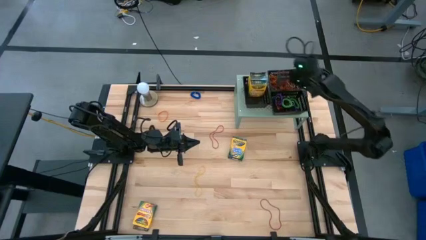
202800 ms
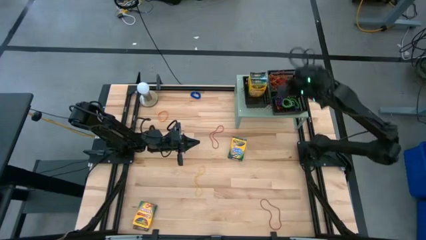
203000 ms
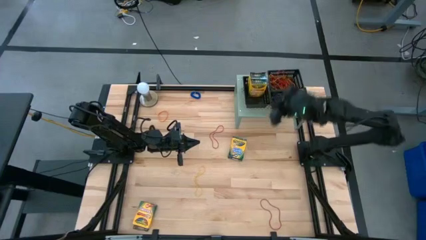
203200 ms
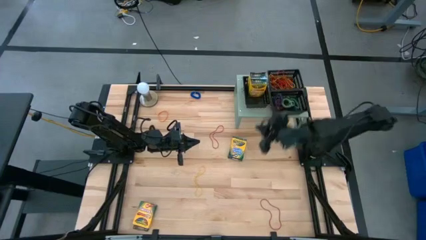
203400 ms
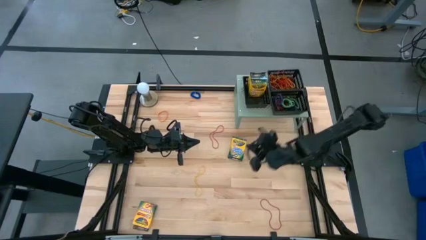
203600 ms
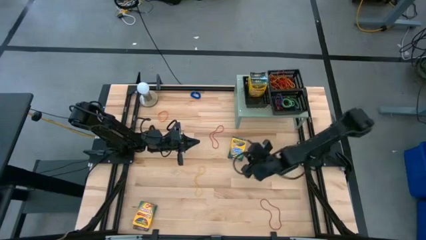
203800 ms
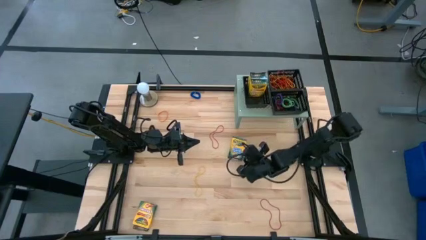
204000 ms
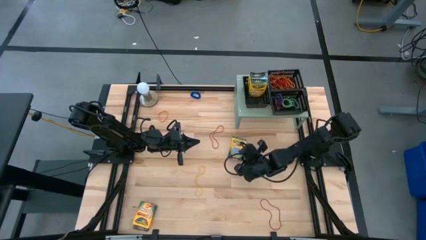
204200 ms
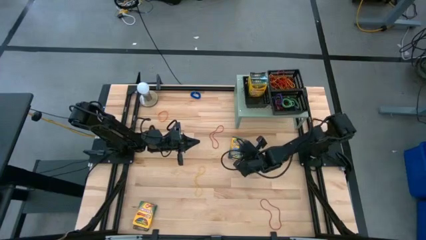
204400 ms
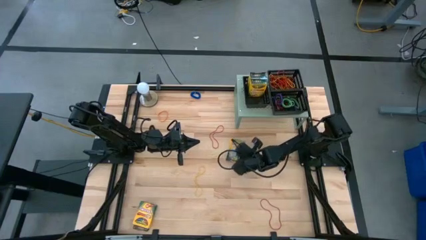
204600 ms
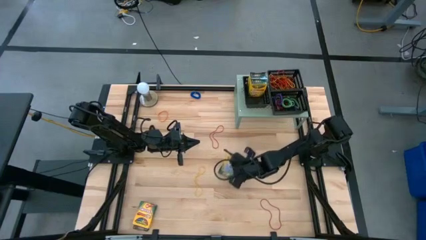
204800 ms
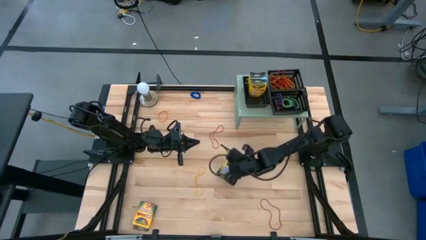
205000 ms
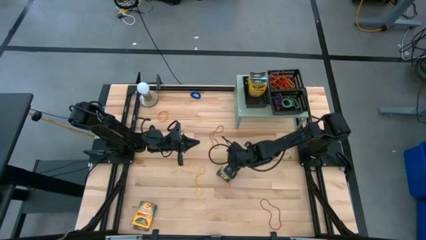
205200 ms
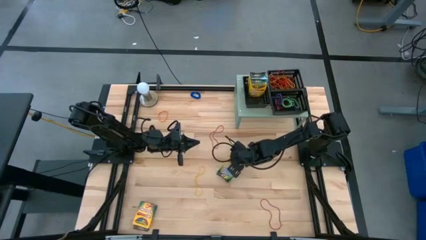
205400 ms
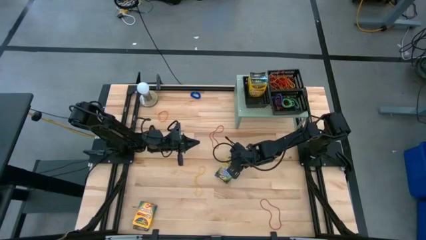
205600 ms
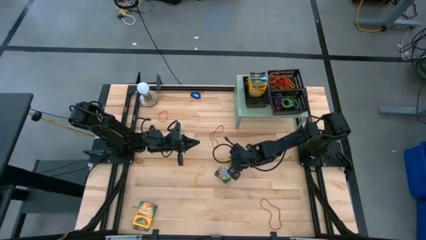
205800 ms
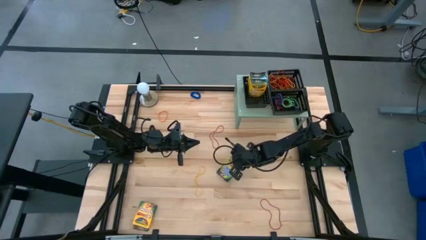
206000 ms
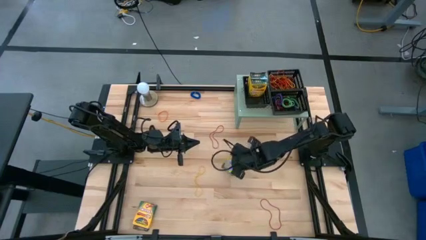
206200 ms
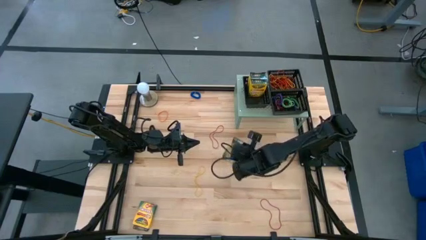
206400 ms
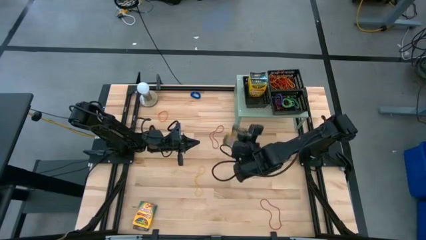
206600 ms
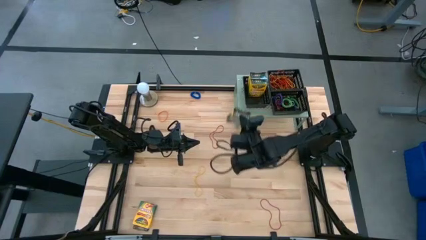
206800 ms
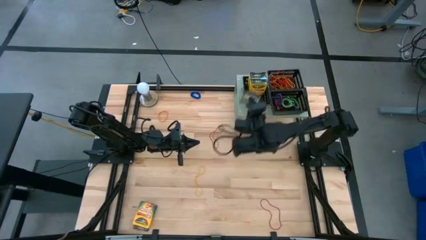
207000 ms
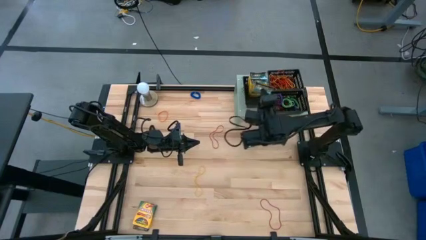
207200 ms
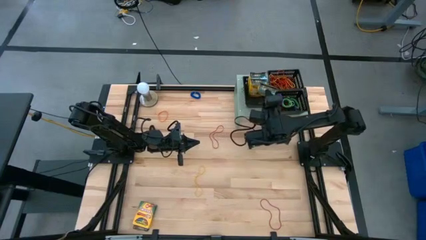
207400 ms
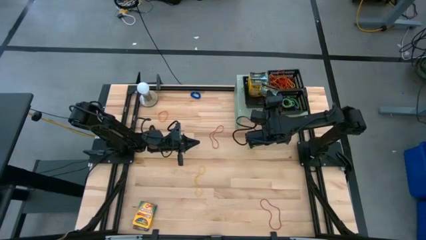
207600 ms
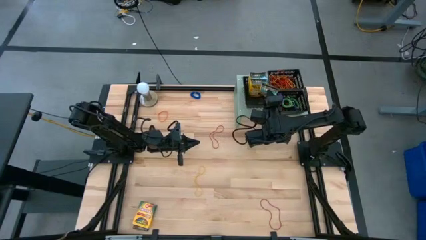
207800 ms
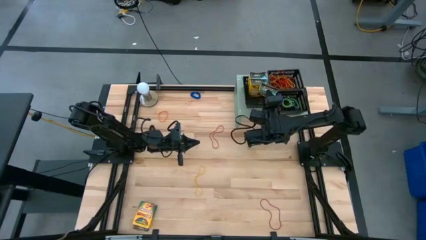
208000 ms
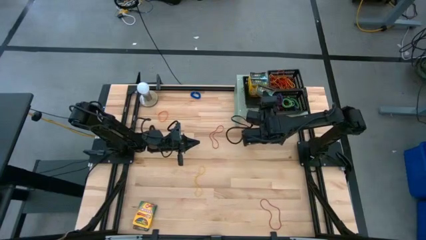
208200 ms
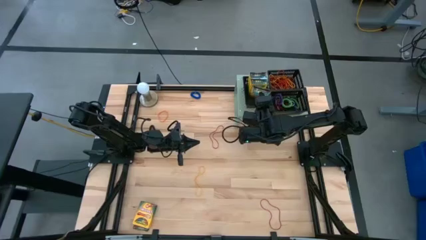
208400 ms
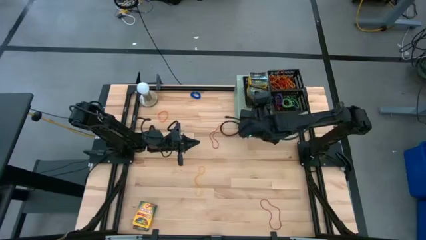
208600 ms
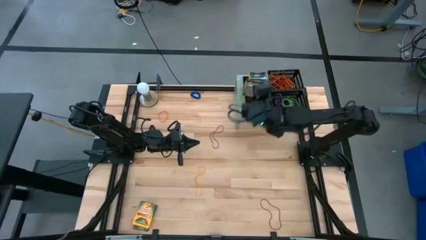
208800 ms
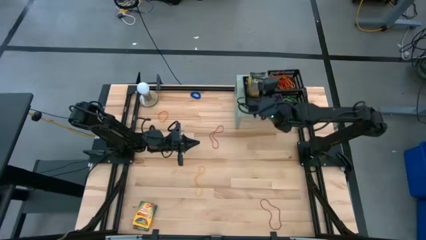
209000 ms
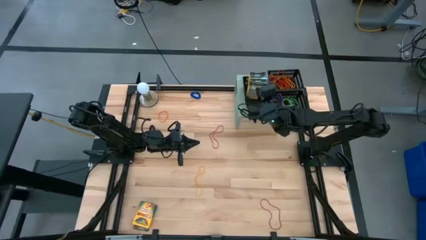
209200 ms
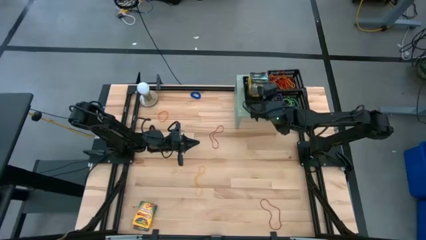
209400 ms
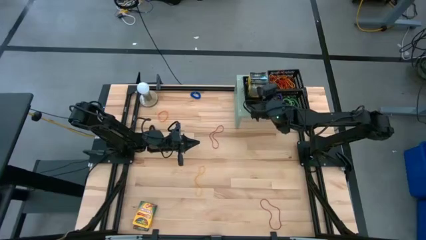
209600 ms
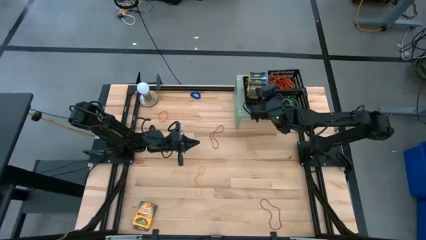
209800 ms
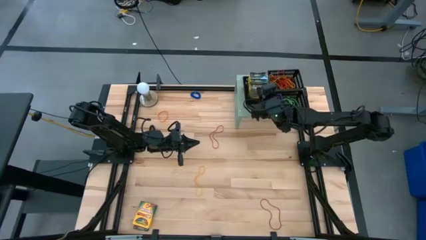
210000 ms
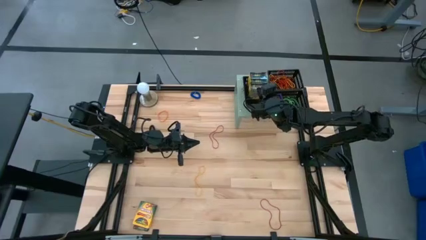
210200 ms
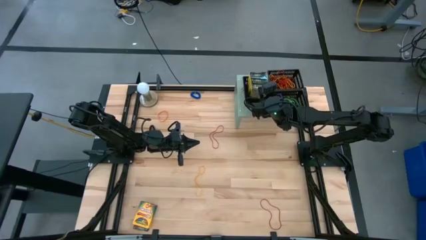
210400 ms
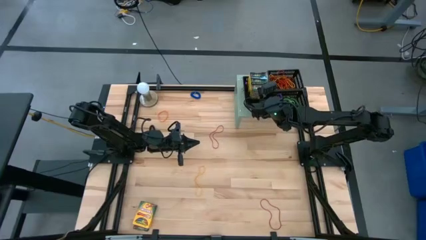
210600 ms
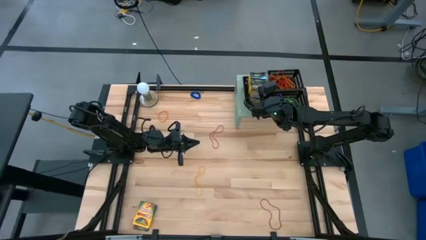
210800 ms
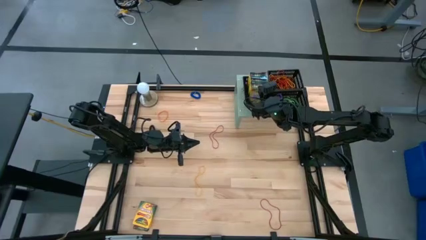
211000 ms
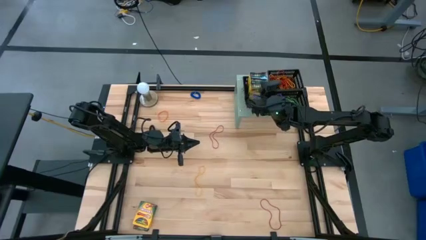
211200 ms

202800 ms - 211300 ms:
Task: Pick & Place Office Desk Supplies
Put the right yellow crayon box into the left black bin on the shelf

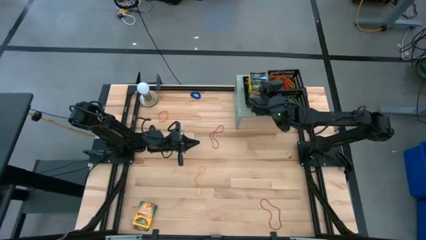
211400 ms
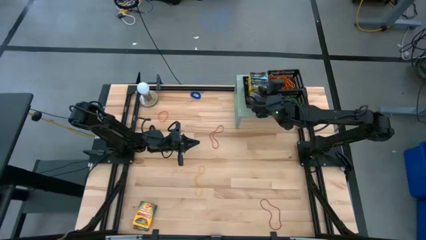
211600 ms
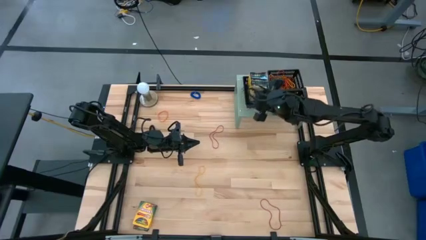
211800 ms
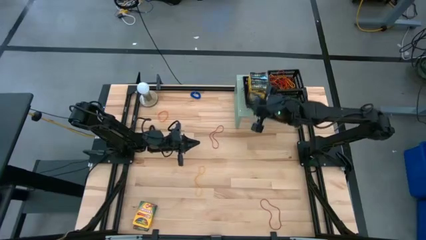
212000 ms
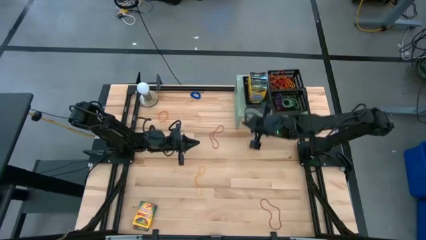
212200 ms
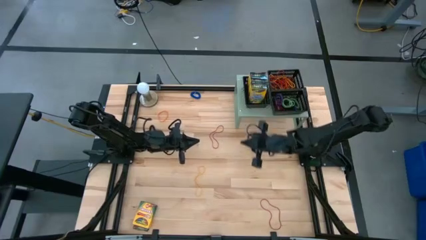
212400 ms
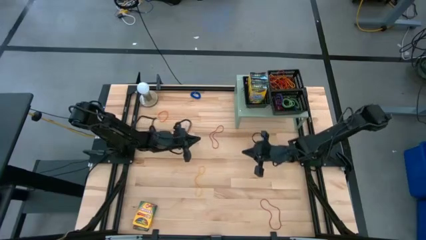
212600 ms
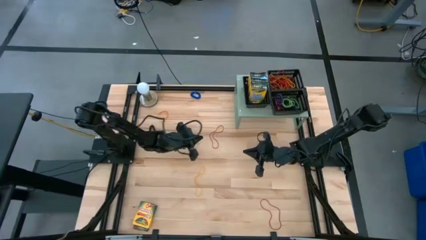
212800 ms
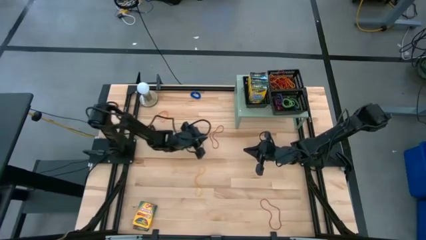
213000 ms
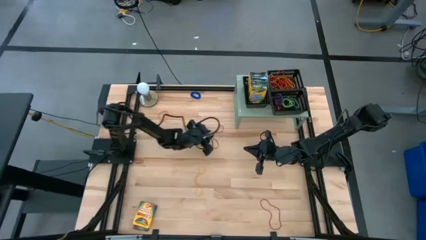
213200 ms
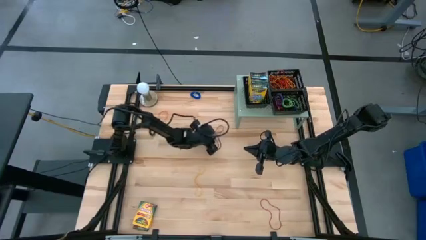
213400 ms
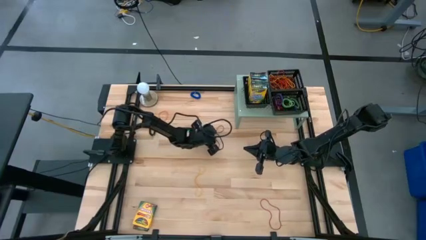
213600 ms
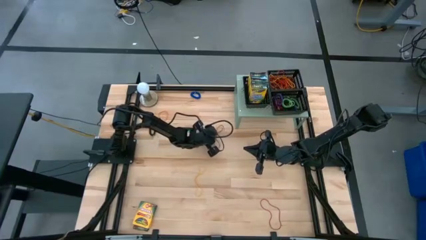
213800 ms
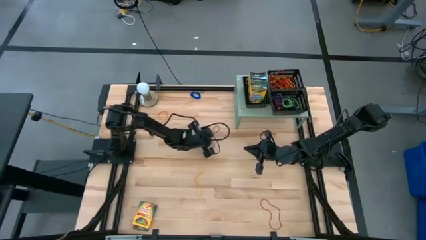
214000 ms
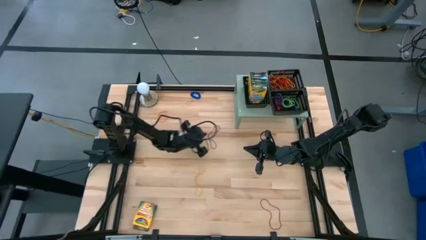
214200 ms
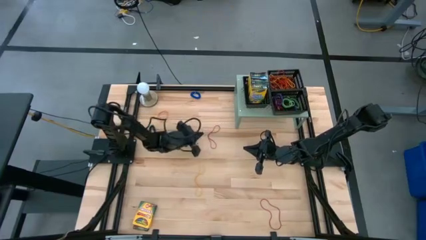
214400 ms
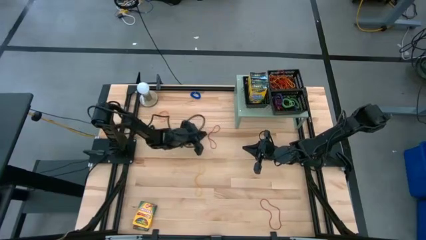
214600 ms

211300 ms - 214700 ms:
Put the red rubber band into the top right black bin on the shelf

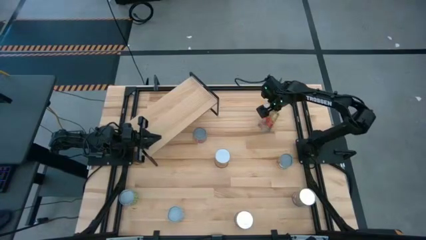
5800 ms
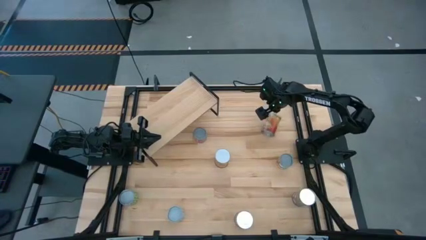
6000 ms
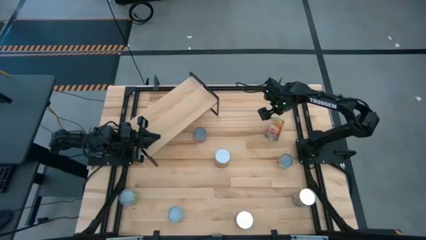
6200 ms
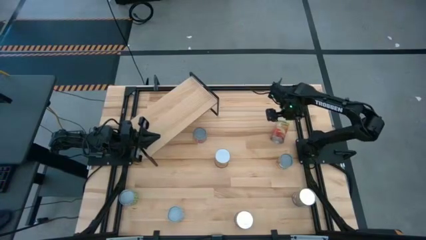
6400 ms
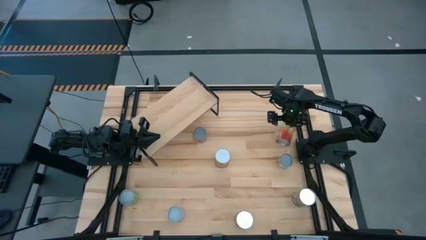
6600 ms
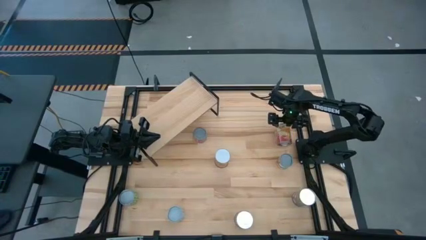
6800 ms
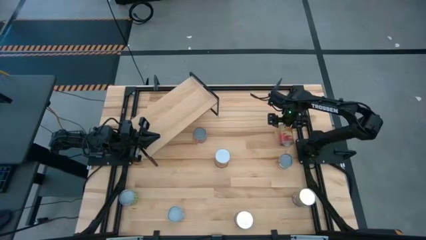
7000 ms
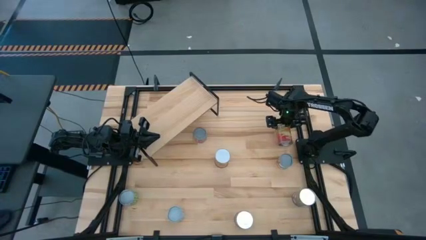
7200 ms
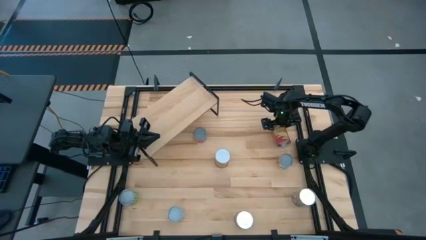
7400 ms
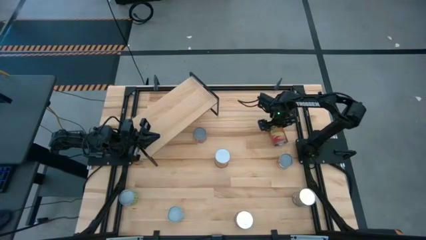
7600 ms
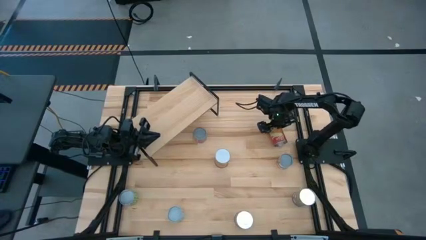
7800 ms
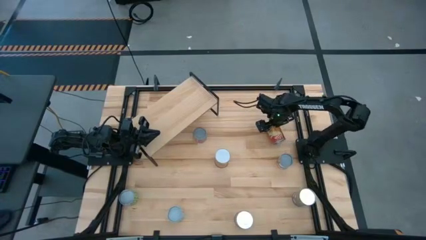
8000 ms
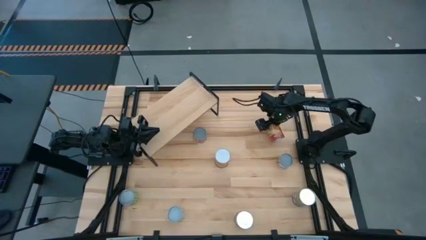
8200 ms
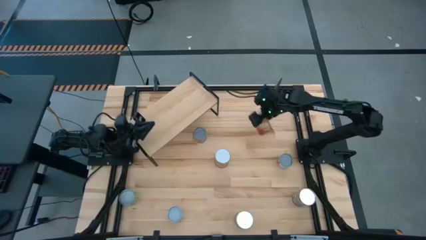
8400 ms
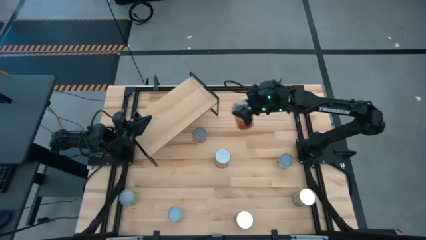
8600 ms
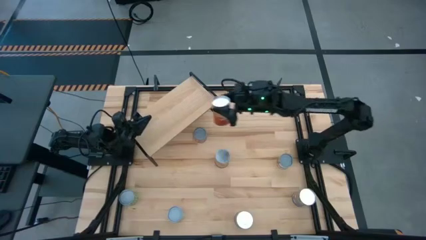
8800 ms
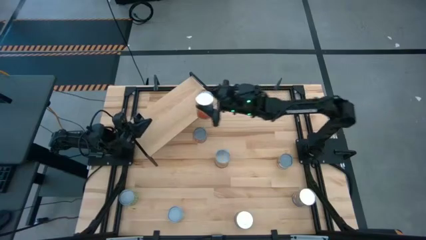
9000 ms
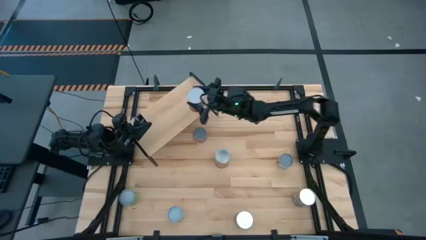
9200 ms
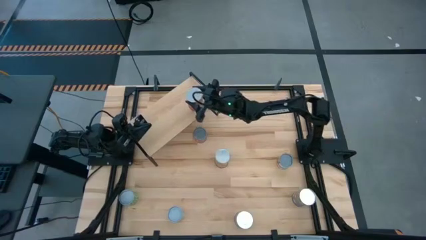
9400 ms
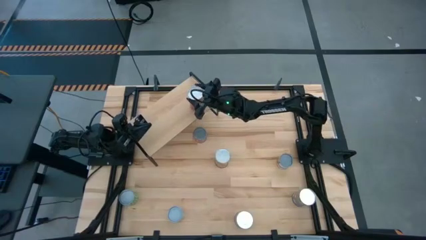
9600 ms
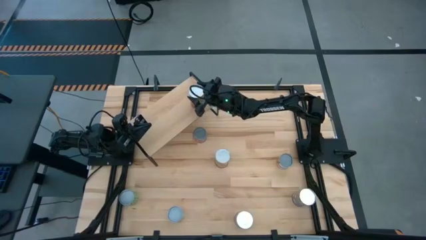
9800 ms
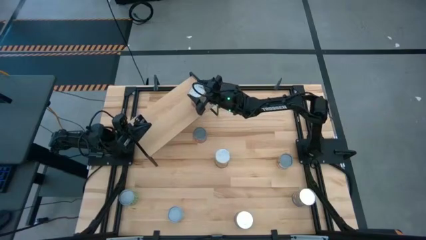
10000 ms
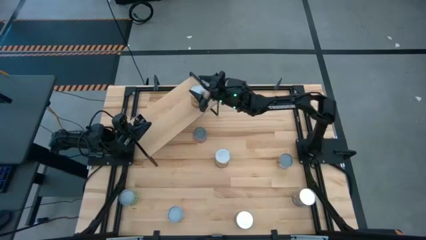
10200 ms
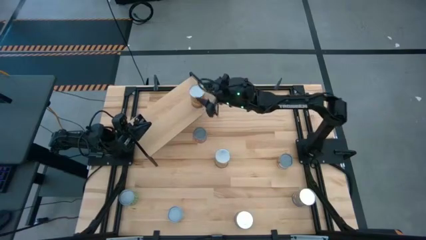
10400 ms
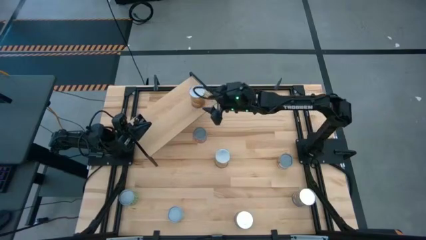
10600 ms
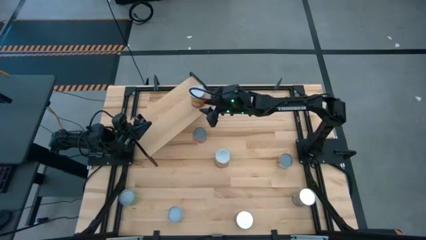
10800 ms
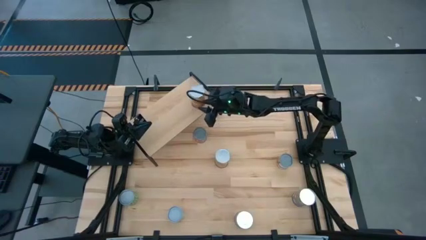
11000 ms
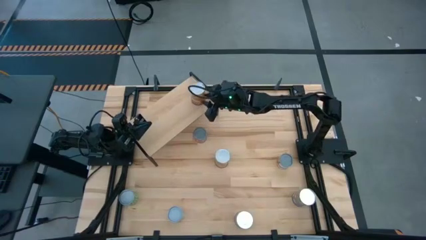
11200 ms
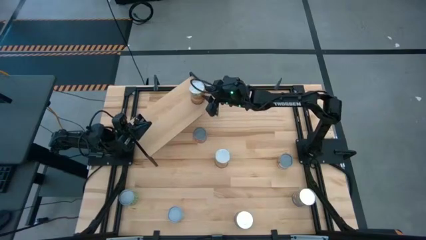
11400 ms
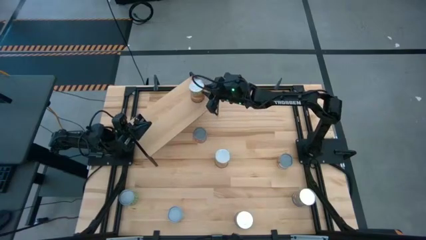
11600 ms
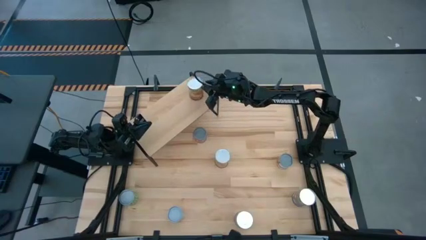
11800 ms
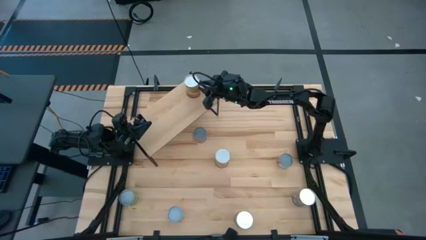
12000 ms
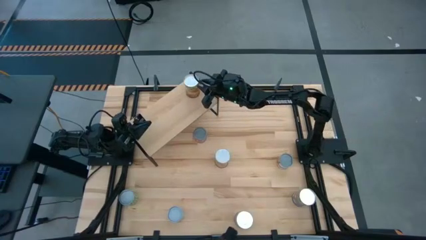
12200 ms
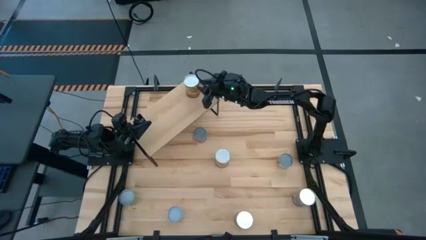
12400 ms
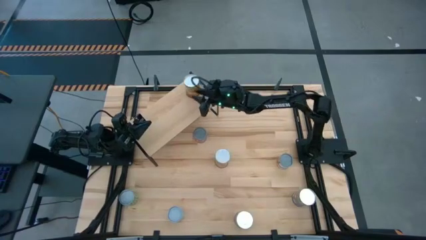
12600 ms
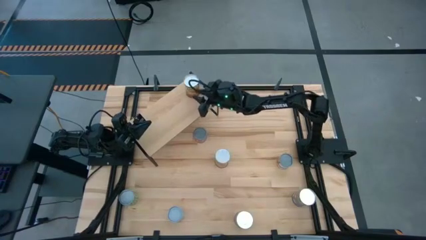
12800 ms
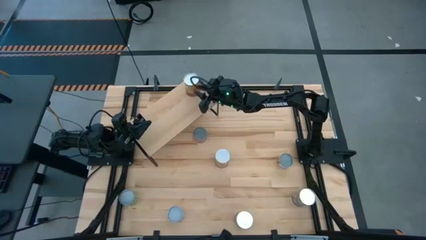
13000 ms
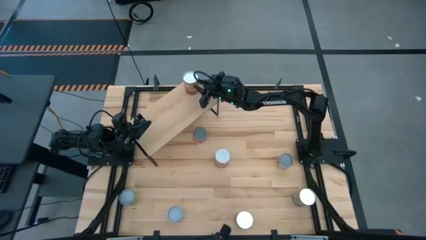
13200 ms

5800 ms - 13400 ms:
Task: Pick and place cans onto a shelf
Put the right large canned corn on the shelf
